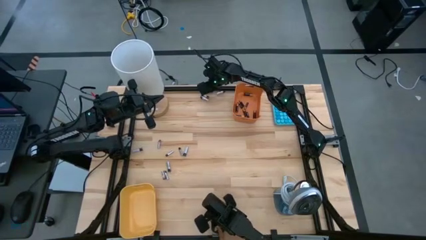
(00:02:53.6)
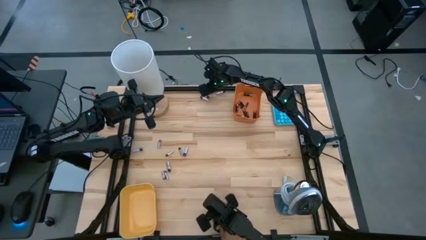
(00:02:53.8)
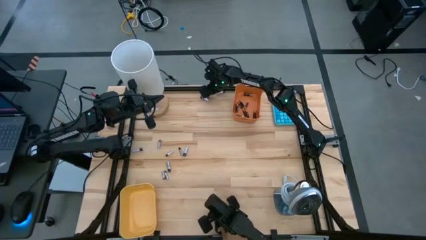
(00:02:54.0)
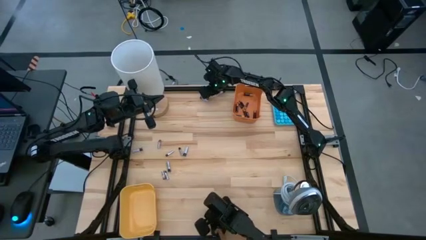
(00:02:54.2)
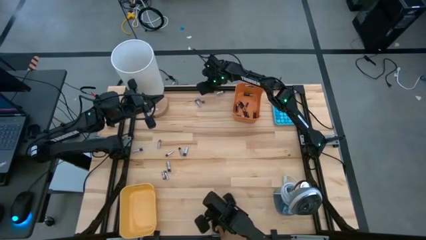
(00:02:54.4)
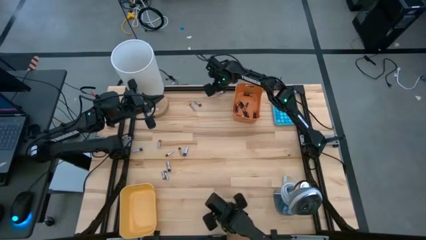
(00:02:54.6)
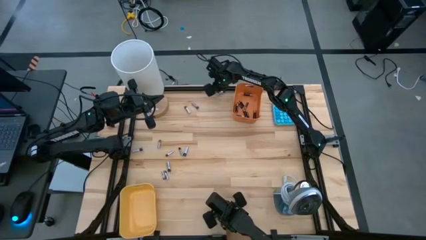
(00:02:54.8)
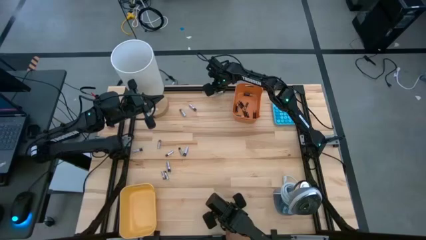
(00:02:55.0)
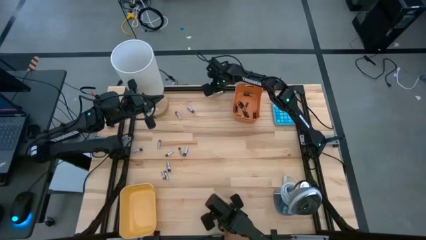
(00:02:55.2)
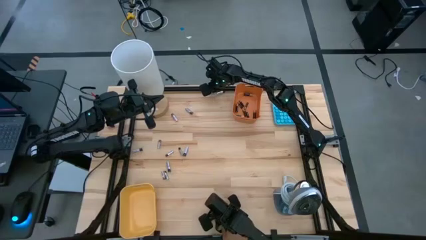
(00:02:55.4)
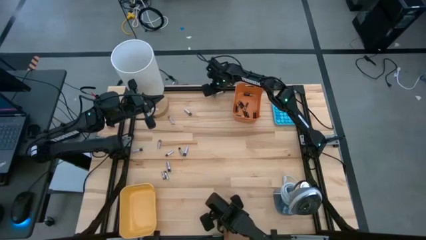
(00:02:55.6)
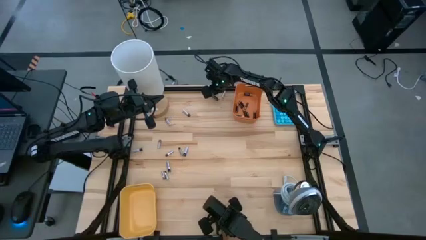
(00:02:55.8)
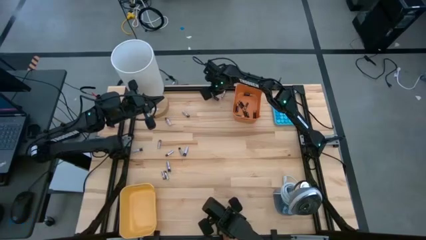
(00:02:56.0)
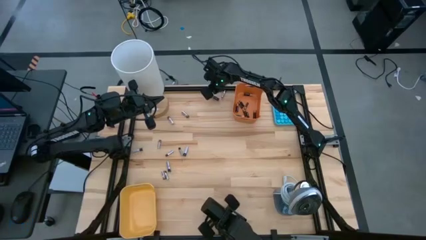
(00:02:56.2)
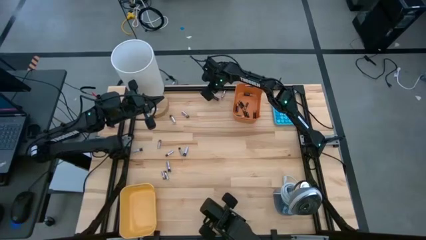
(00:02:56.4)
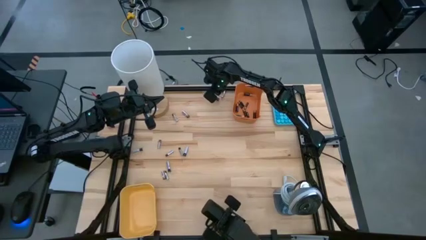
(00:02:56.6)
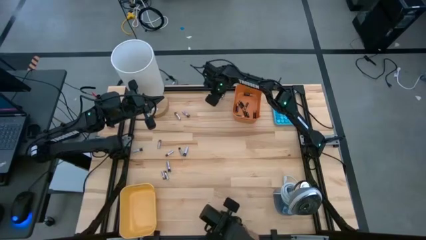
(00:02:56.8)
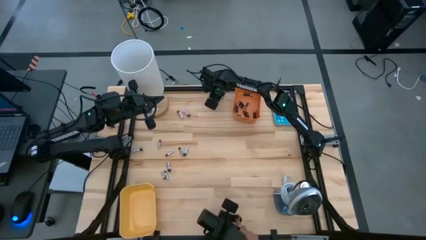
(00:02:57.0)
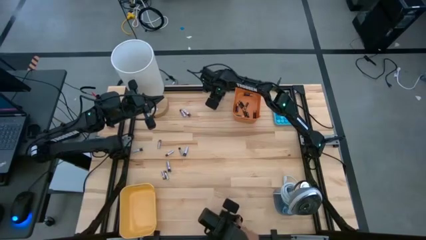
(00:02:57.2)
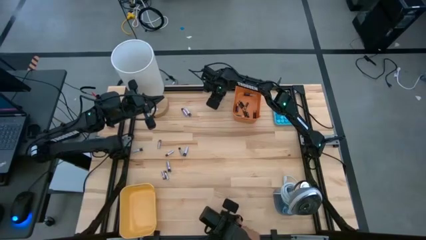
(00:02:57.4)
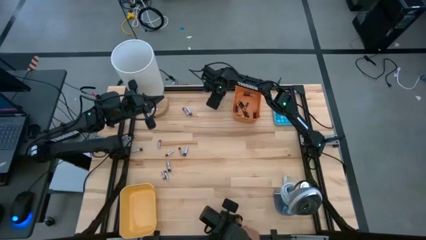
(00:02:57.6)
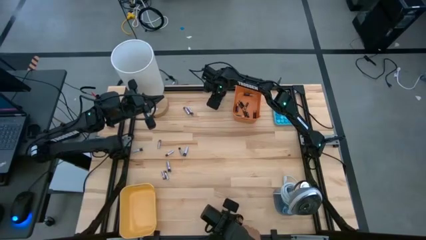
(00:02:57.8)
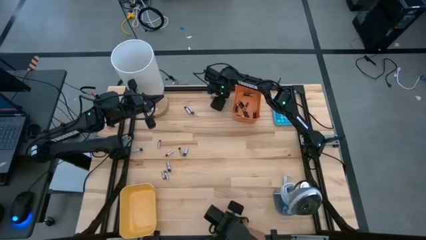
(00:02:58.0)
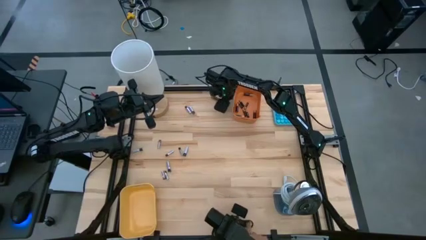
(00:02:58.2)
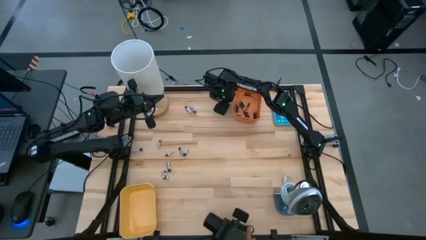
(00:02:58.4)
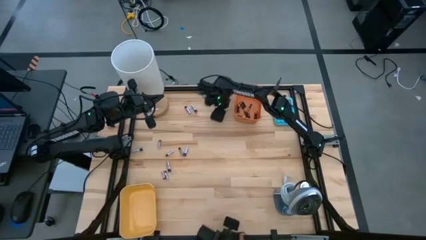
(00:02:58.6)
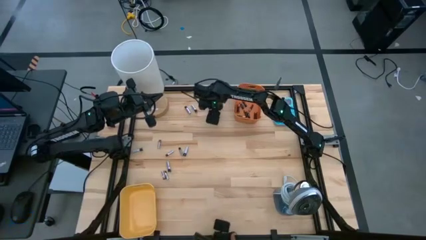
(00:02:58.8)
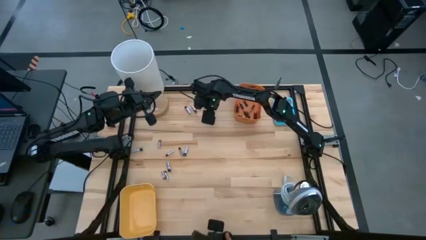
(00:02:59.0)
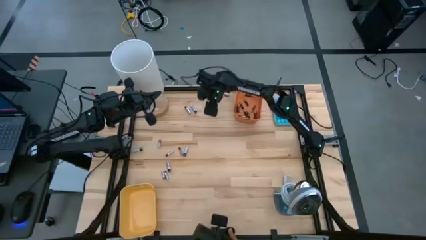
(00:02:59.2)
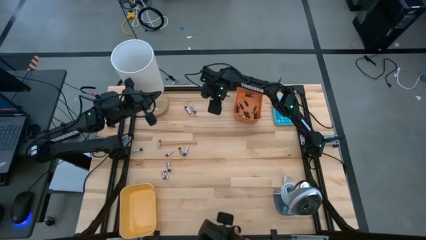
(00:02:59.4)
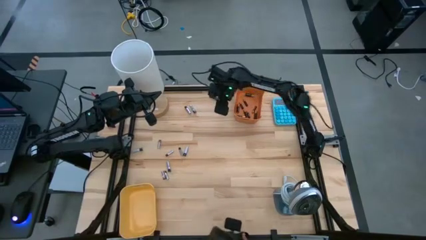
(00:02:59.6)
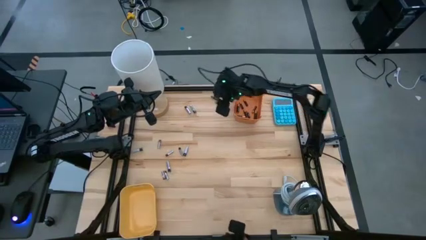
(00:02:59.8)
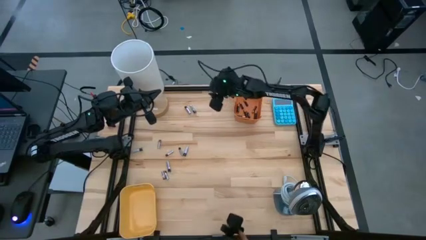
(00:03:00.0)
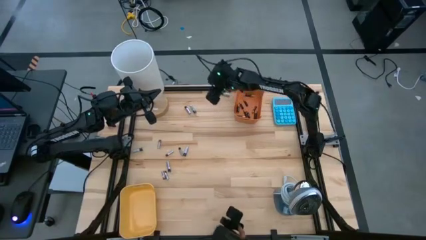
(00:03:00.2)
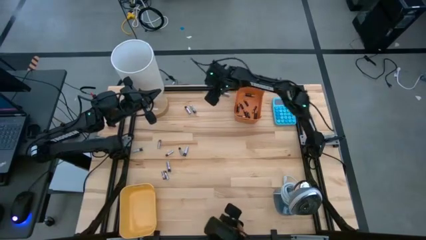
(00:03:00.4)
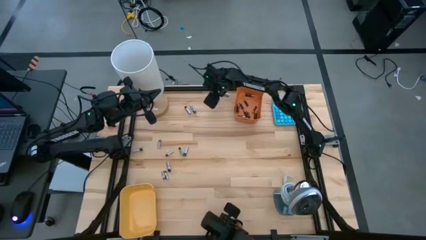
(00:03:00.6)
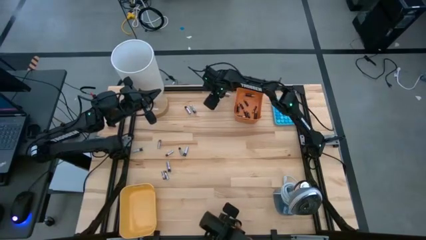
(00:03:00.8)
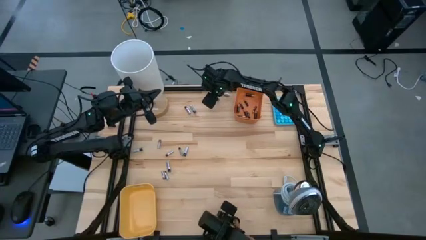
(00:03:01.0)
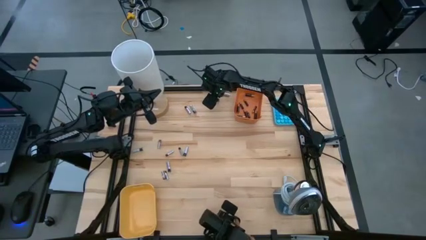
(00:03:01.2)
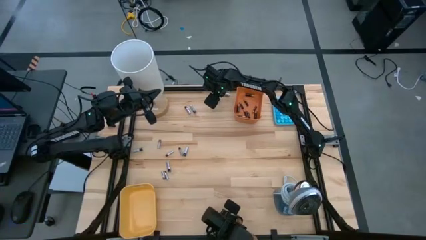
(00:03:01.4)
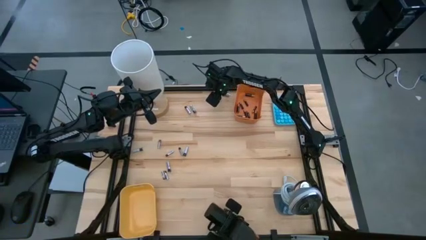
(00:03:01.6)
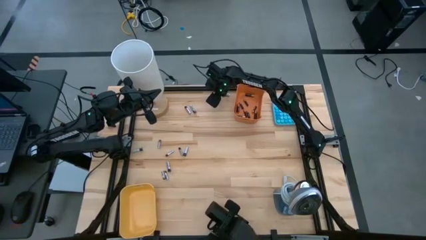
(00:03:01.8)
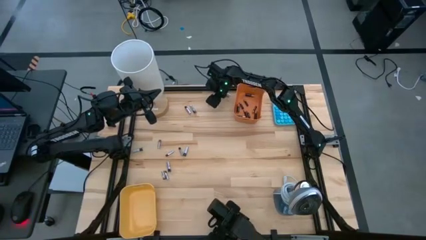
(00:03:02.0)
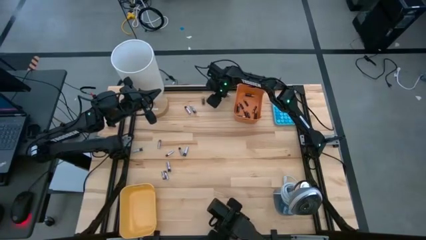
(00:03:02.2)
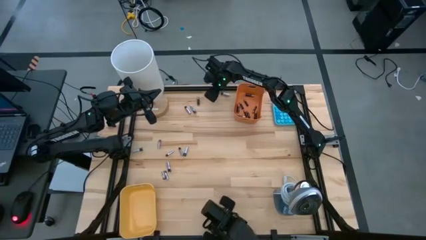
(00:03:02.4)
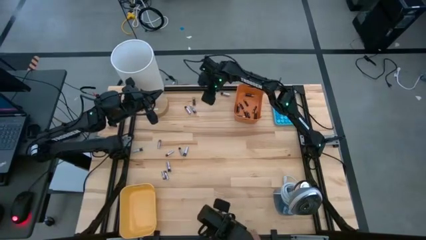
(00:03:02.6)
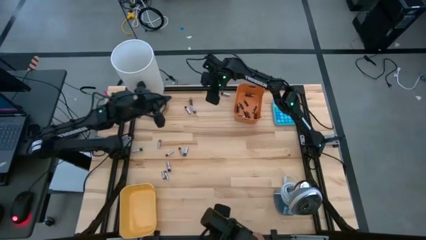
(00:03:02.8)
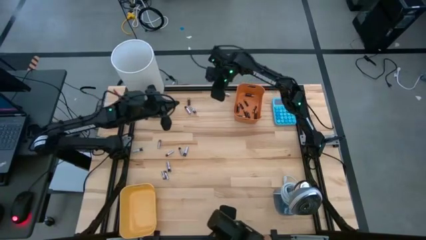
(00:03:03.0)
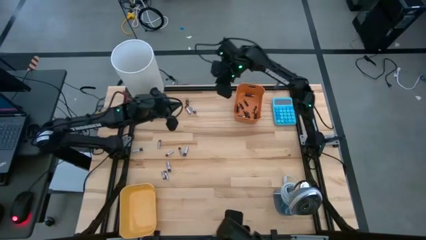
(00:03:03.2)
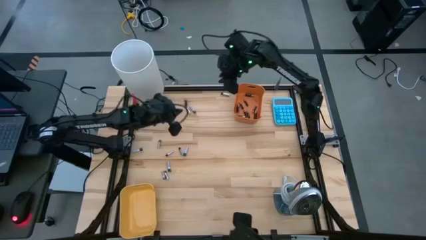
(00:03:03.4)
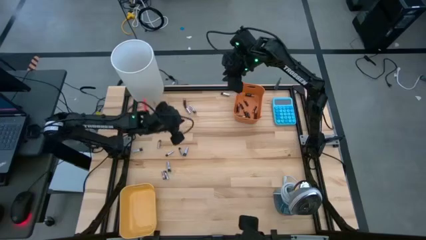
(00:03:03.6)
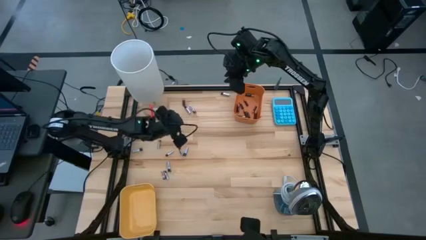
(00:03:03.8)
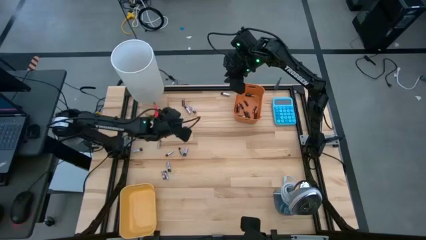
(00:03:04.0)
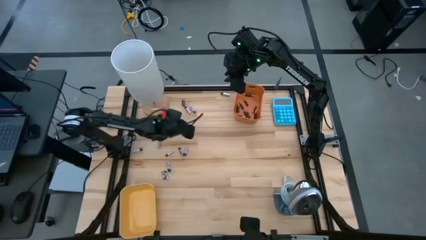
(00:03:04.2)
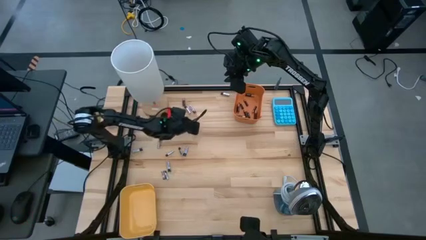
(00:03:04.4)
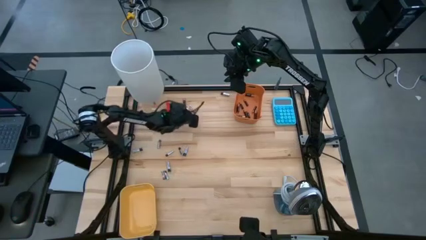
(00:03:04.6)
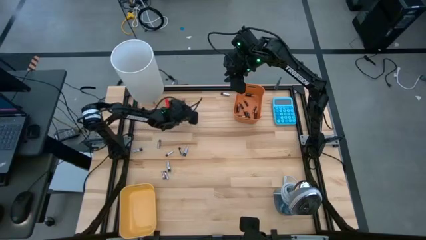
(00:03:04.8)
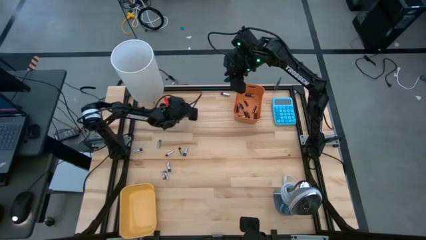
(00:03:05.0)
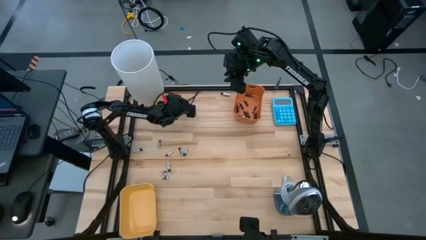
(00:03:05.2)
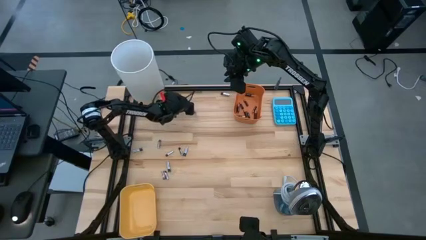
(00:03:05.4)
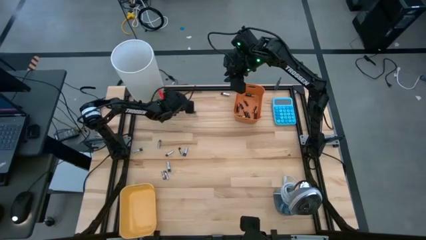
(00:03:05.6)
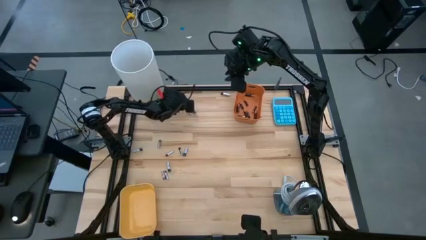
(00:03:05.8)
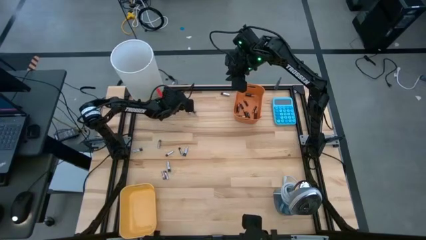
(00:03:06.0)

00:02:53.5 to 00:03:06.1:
Task: Sort batteries
Put the black battery into the orange bin
